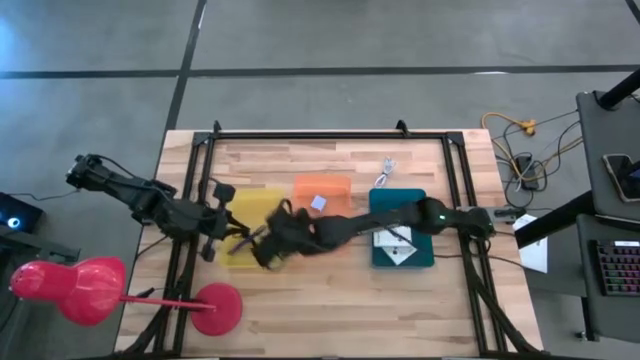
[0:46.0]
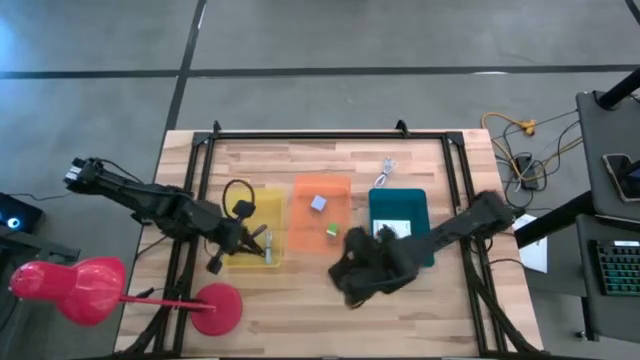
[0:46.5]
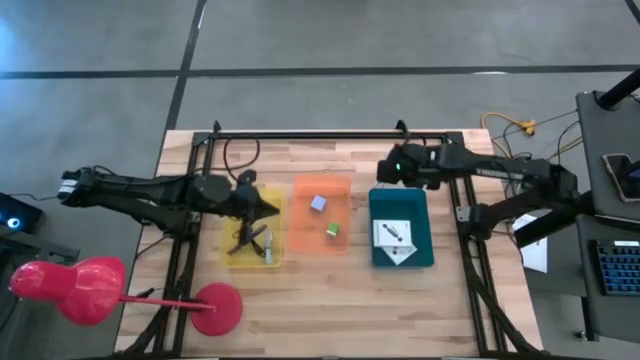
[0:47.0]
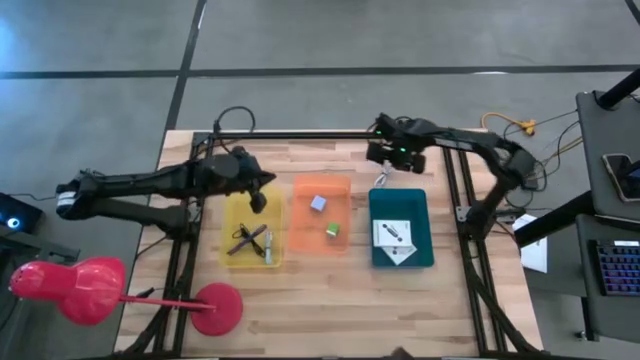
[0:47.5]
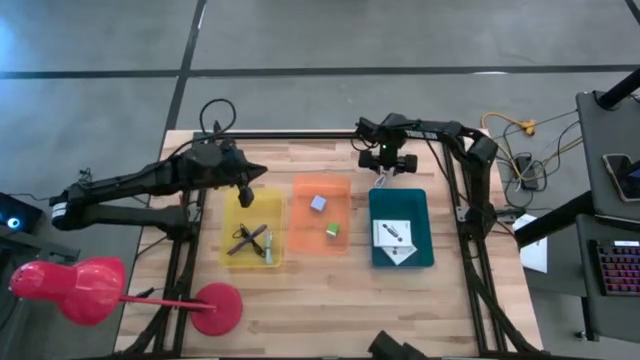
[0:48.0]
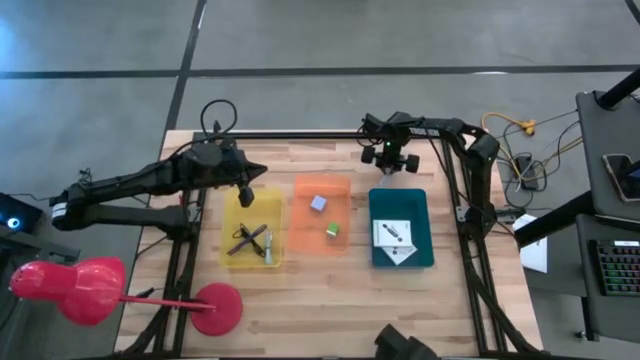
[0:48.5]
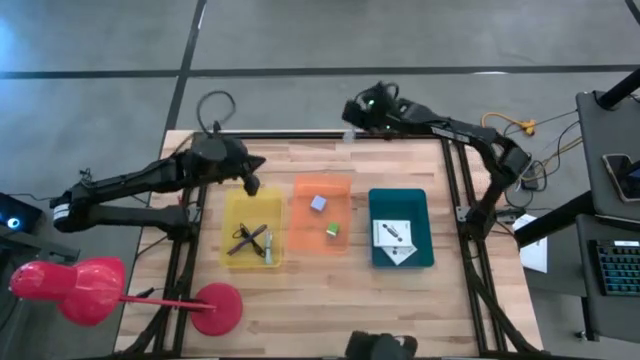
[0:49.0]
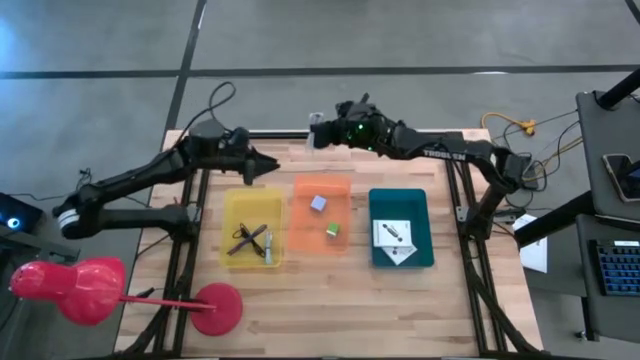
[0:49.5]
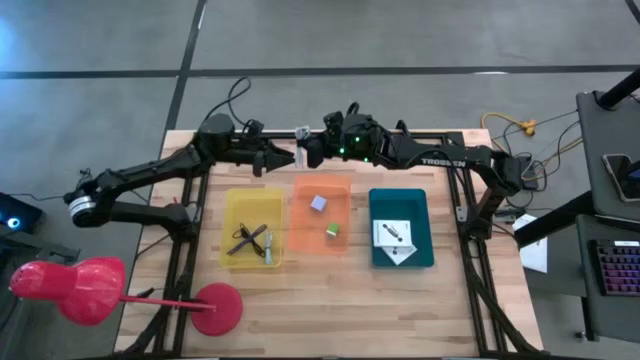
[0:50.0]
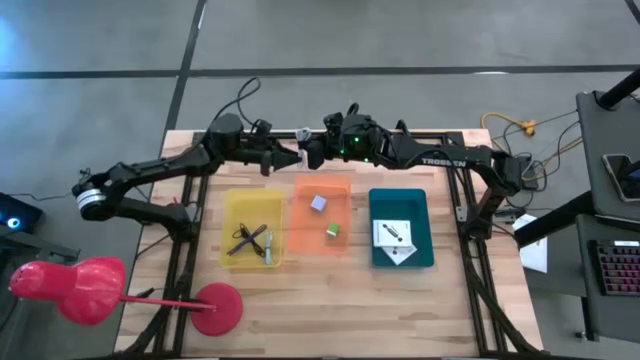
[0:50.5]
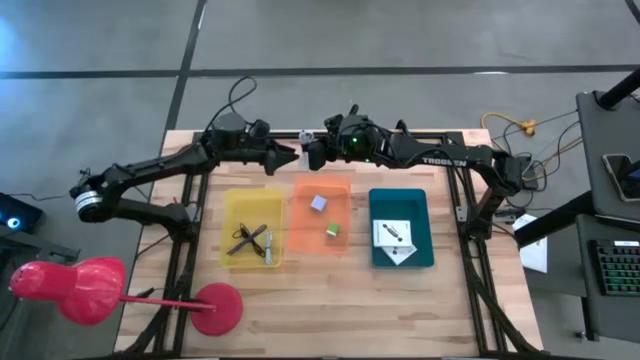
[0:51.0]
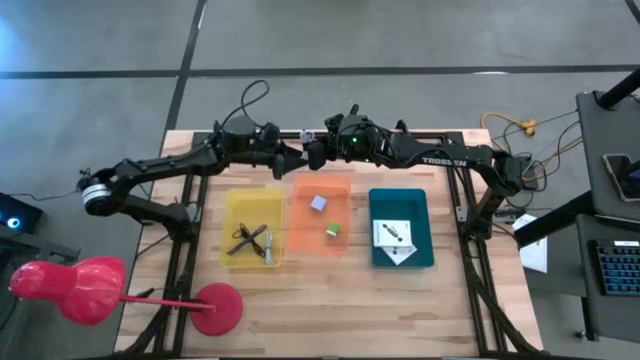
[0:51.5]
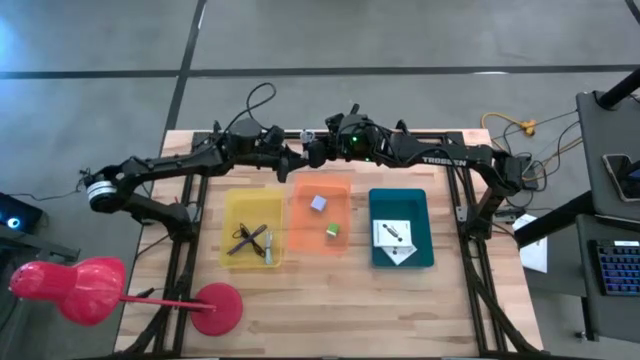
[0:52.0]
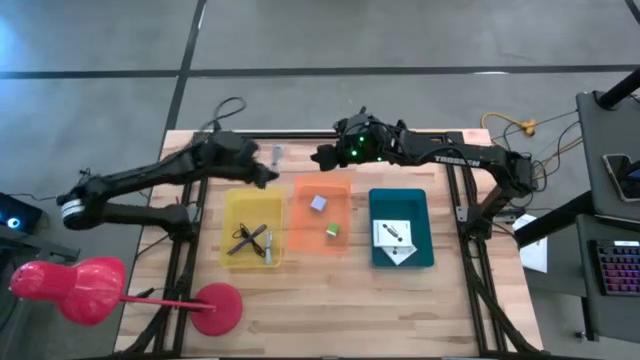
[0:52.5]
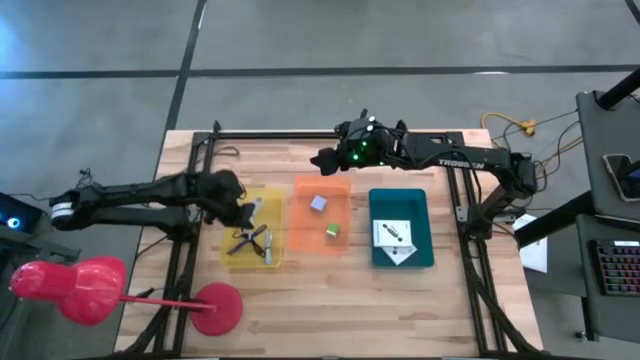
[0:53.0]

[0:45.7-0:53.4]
Task: Pick and place items into bin
Put the white charger cable into the yellow bin

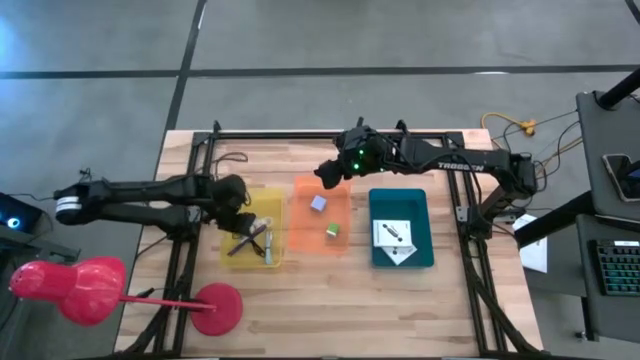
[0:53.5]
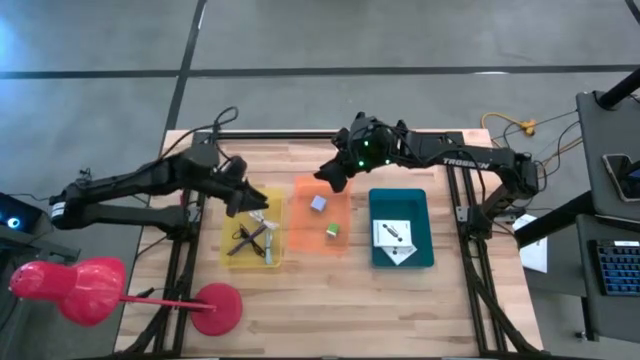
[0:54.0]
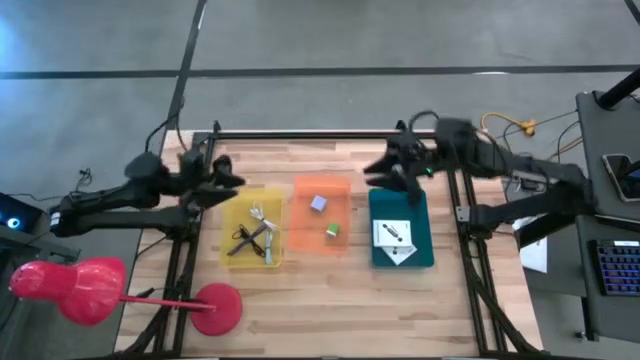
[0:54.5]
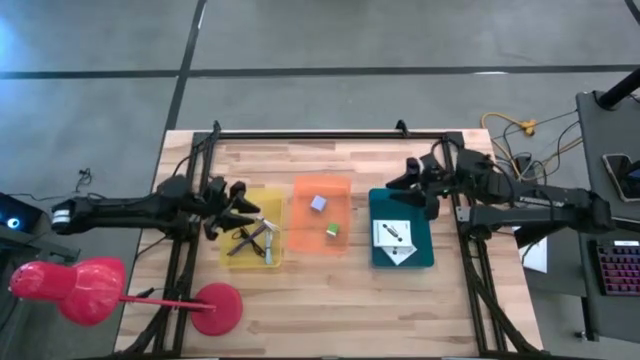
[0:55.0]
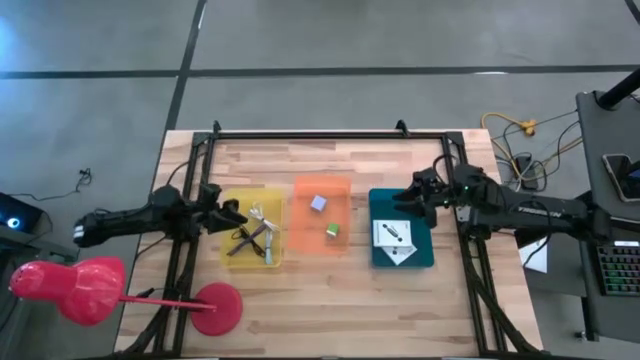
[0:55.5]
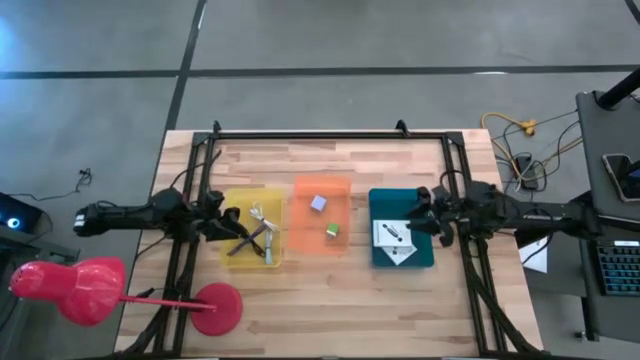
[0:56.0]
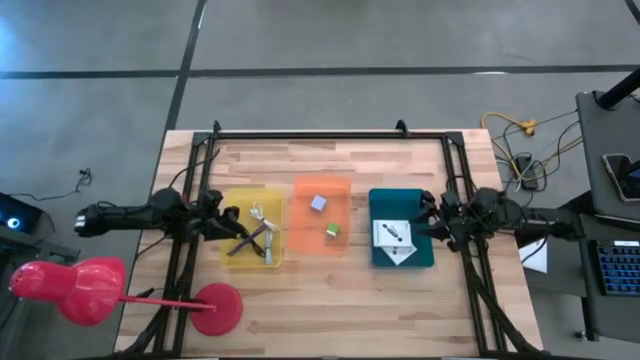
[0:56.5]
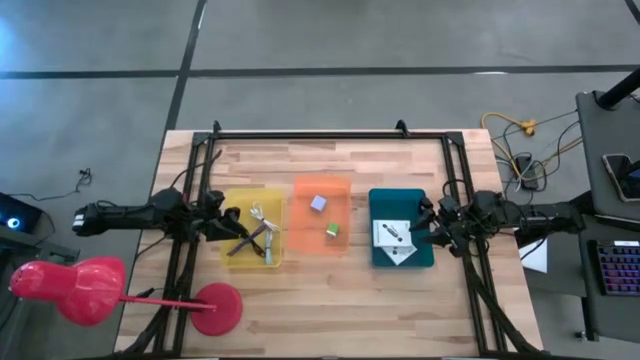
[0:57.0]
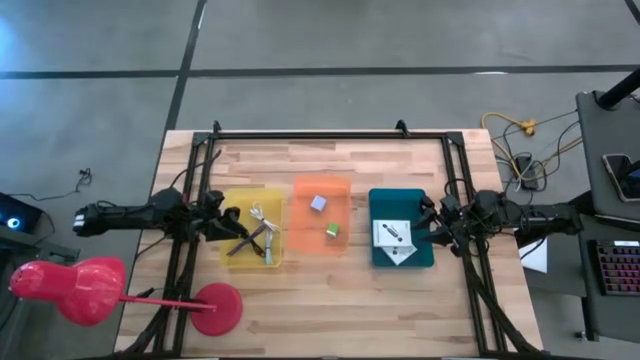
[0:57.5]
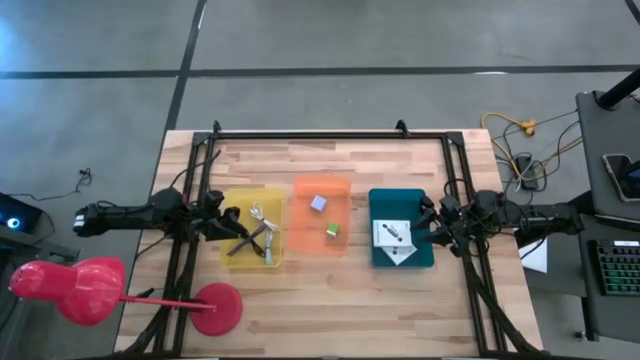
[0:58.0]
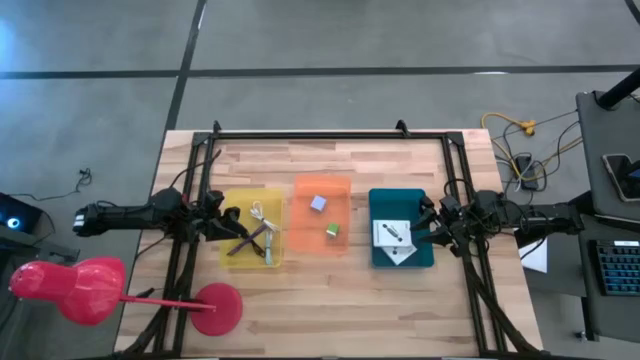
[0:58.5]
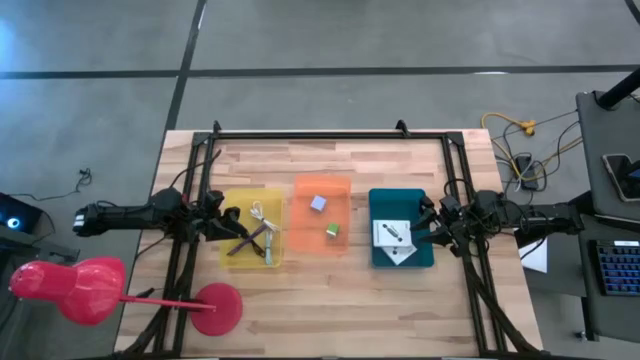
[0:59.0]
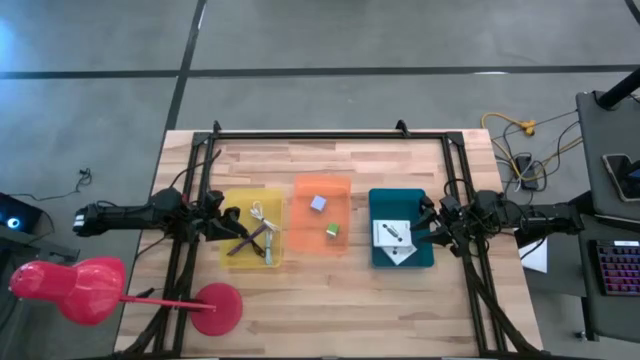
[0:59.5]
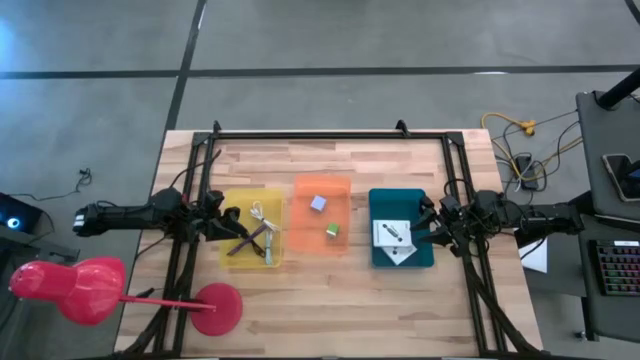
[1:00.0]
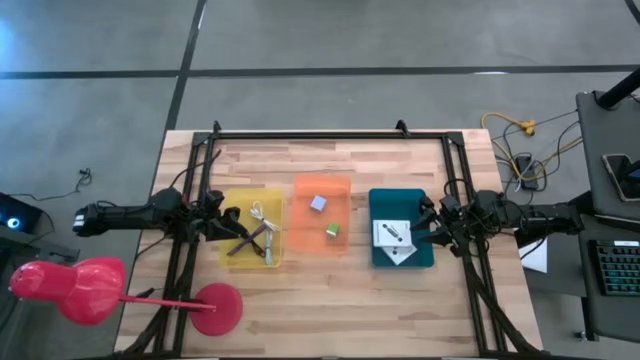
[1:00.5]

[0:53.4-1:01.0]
Return to Home Position

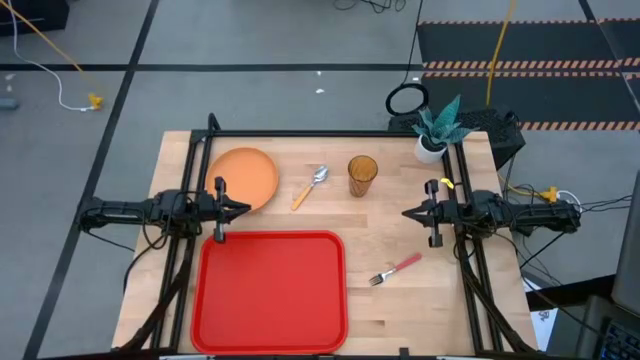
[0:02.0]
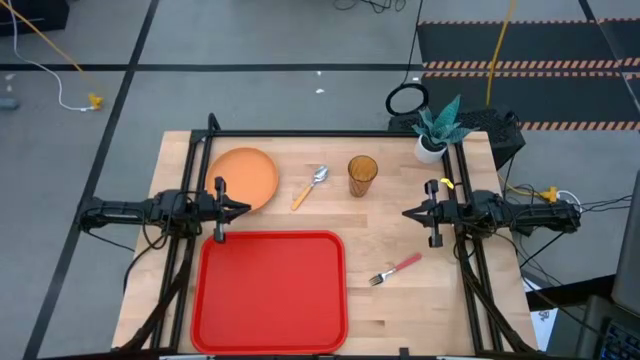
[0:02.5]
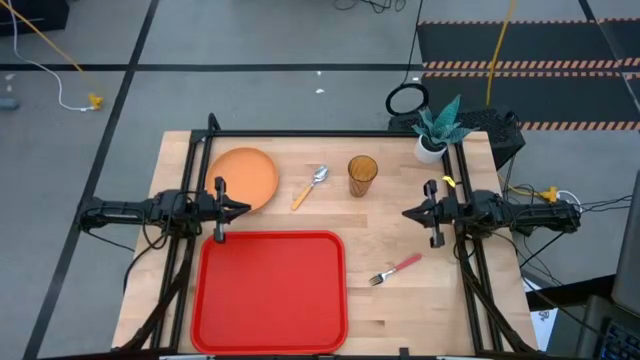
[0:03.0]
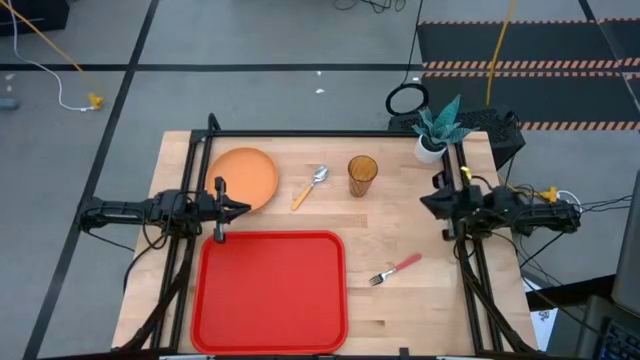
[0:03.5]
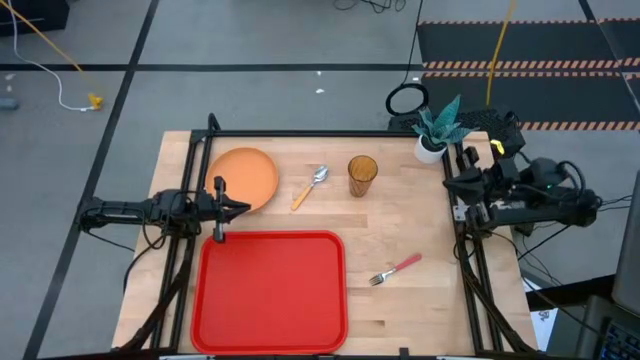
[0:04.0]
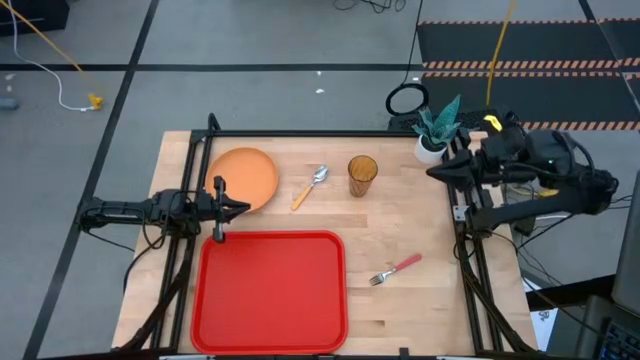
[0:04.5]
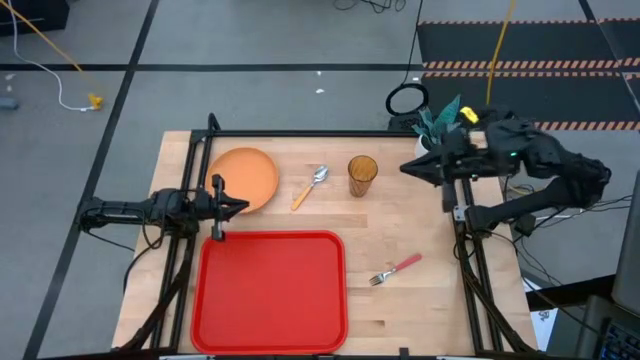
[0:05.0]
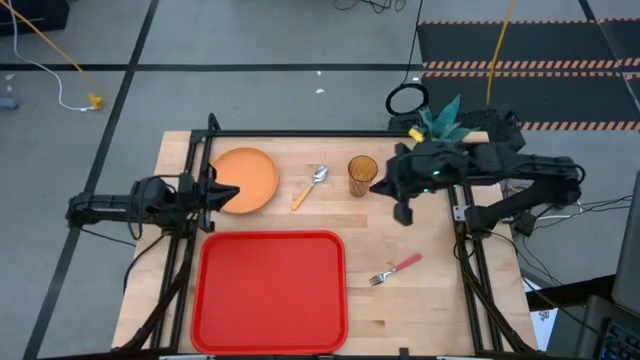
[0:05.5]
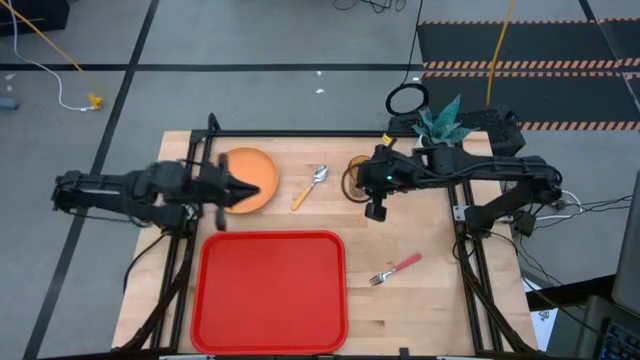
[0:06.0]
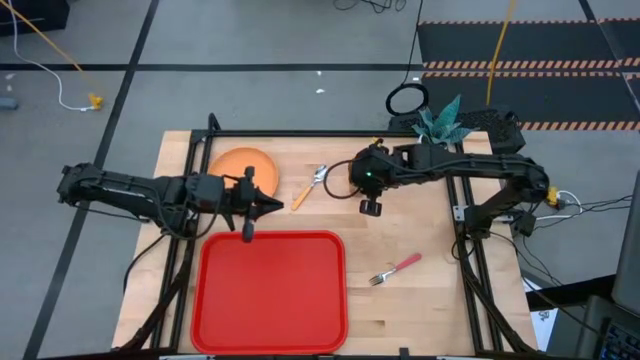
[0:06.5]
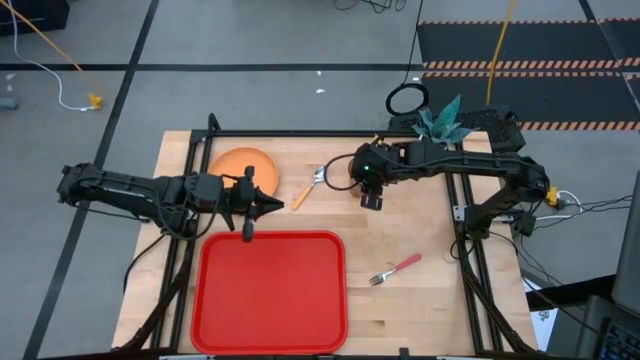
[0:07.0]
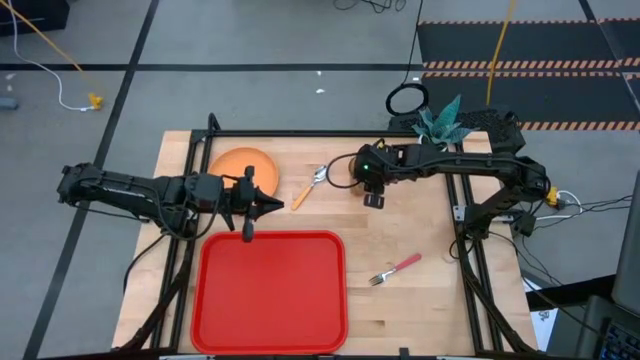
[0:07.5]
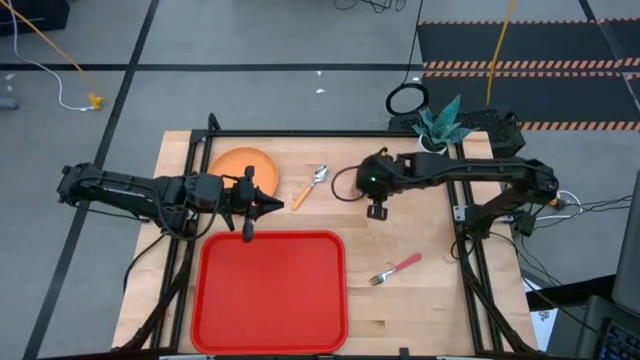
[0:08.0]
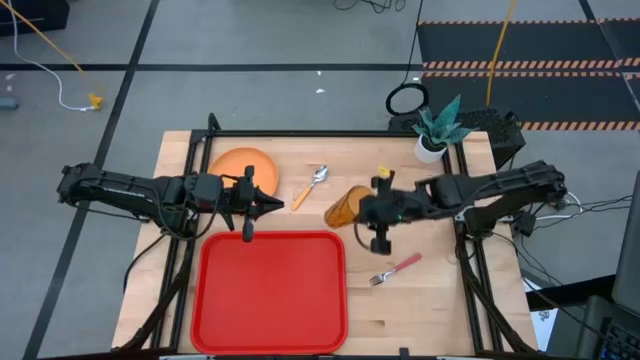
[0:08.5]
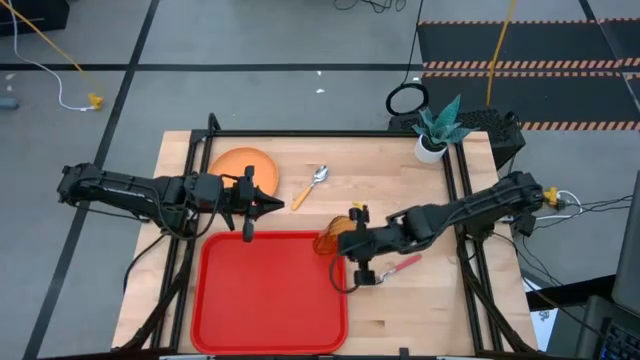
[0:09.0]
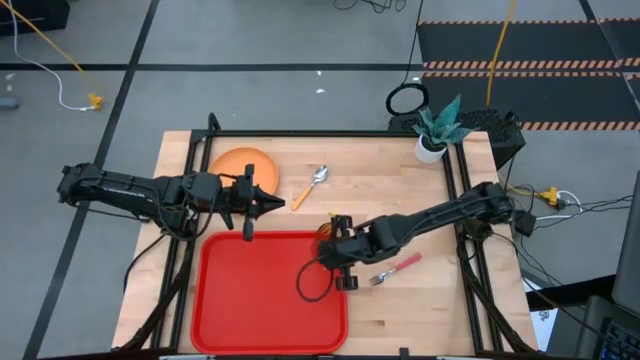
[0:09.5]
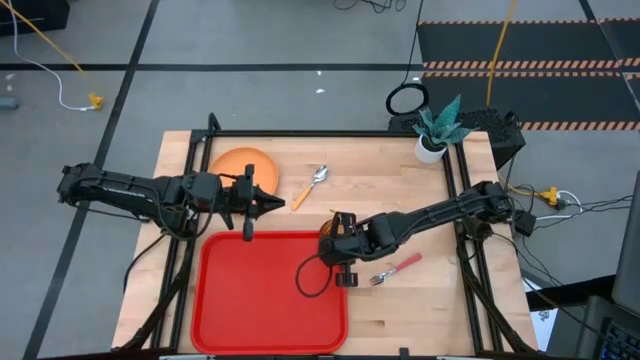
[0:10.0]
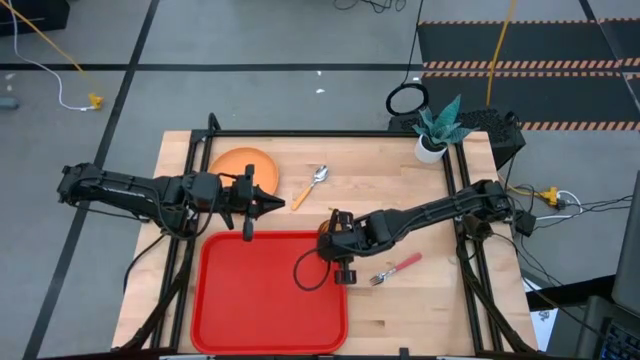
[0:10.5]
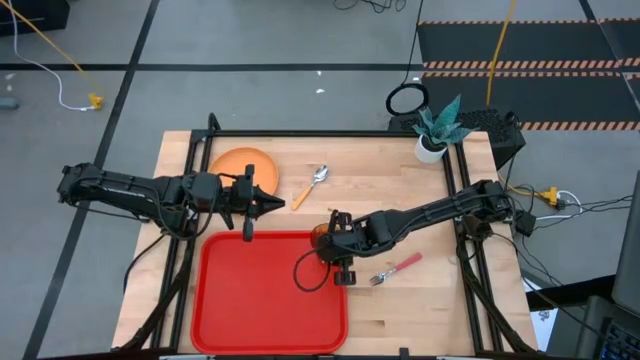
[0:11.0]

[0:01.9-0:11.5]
Task: Pick and place plate/cup/fork/spoon on tray
Put the orange cup on the red serving tray
